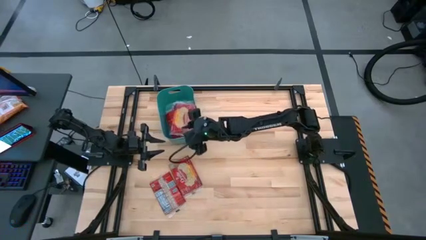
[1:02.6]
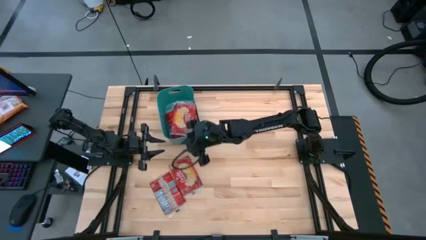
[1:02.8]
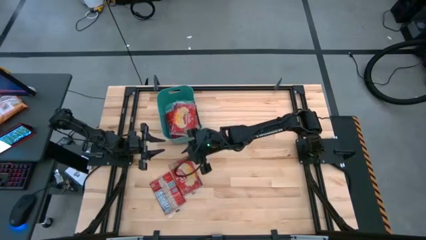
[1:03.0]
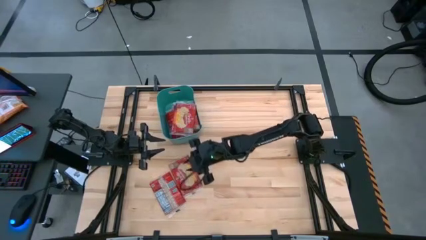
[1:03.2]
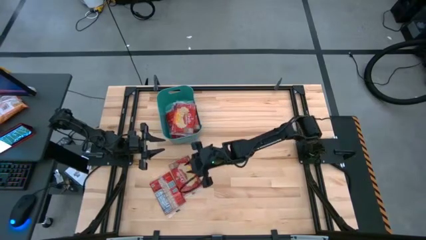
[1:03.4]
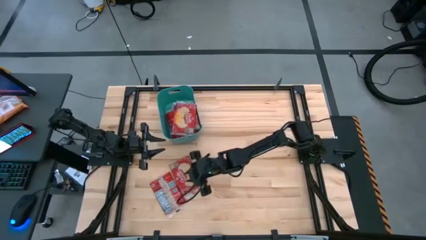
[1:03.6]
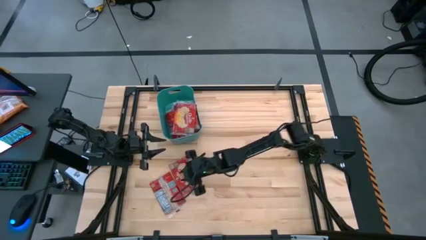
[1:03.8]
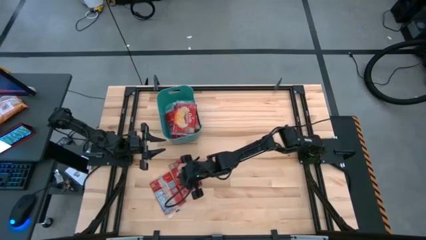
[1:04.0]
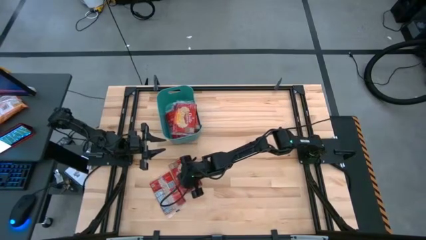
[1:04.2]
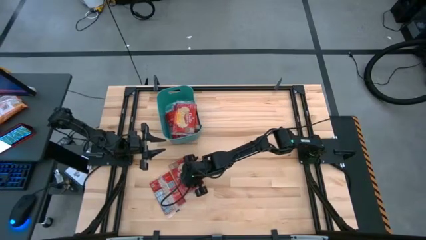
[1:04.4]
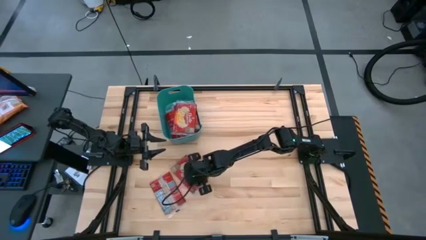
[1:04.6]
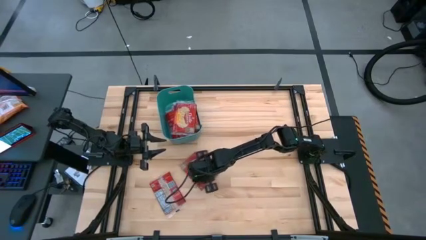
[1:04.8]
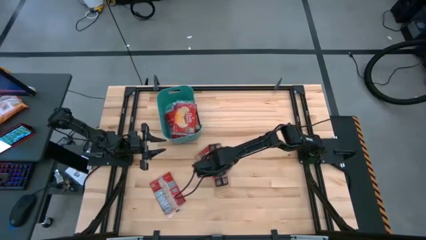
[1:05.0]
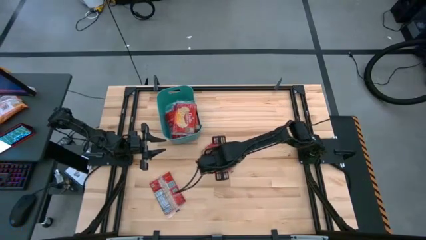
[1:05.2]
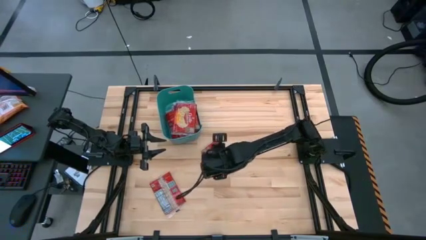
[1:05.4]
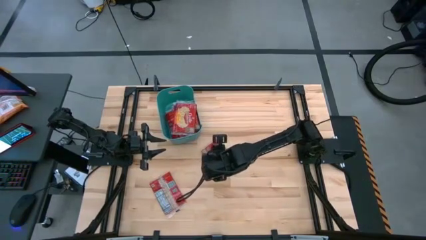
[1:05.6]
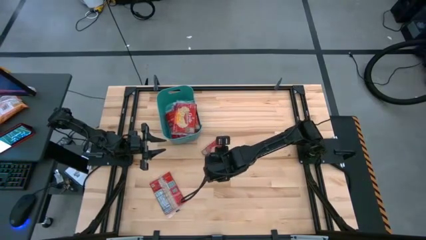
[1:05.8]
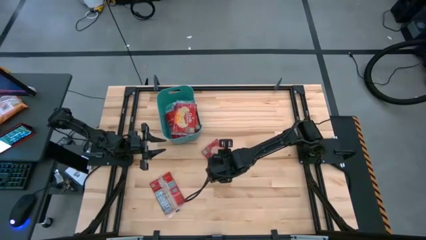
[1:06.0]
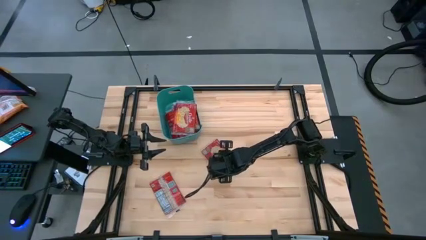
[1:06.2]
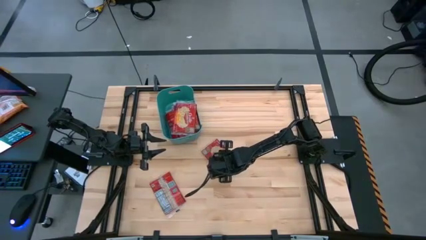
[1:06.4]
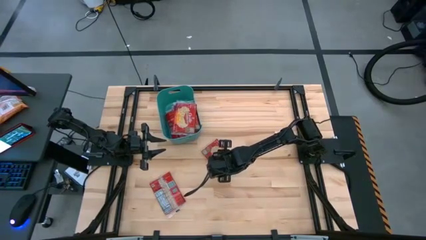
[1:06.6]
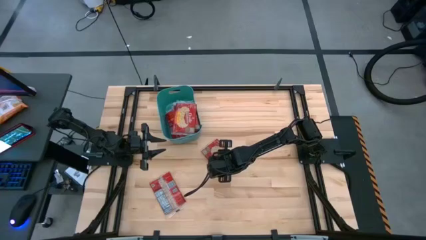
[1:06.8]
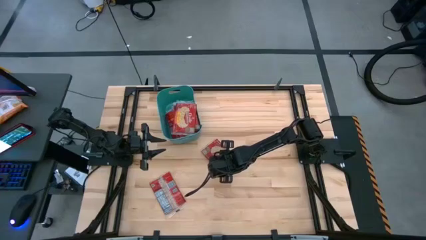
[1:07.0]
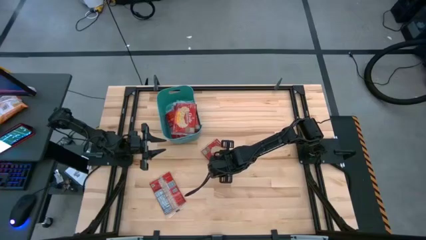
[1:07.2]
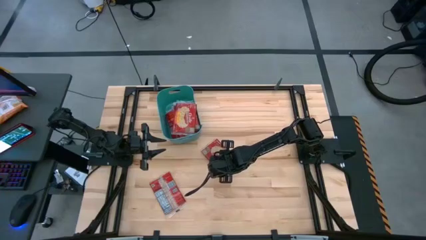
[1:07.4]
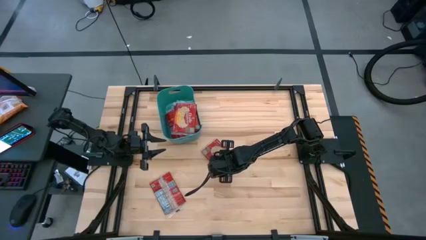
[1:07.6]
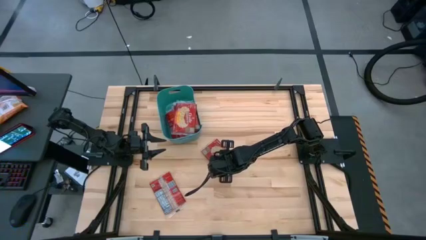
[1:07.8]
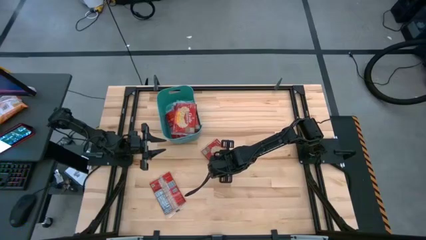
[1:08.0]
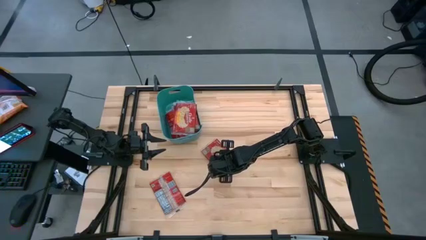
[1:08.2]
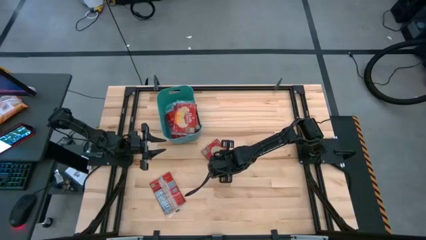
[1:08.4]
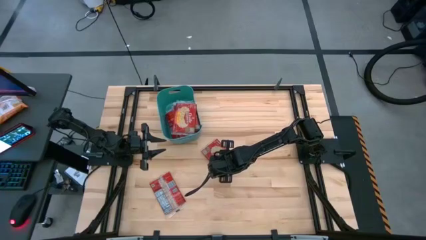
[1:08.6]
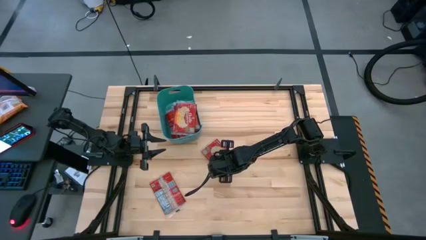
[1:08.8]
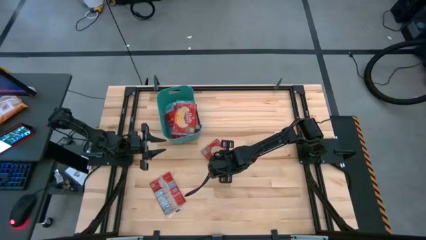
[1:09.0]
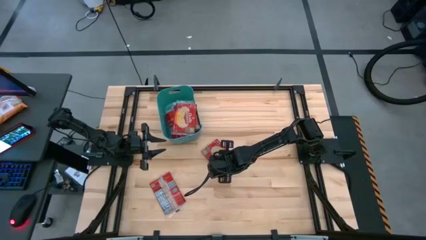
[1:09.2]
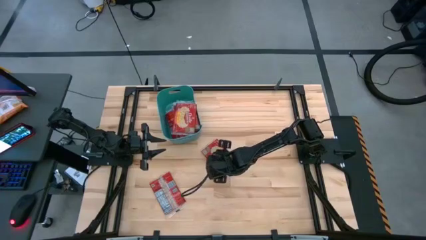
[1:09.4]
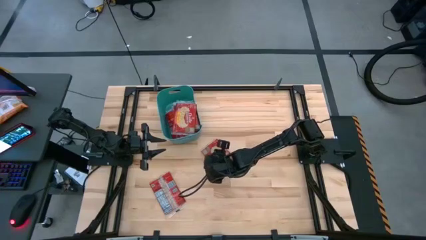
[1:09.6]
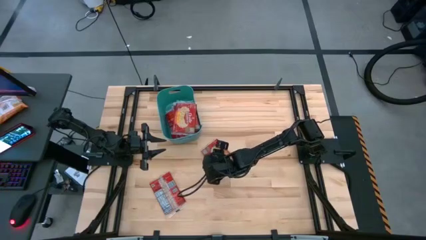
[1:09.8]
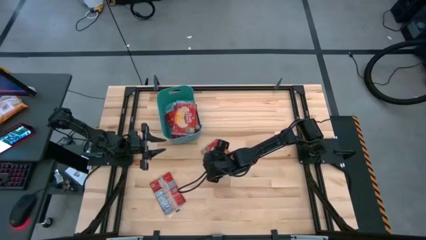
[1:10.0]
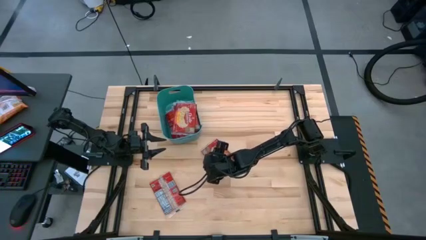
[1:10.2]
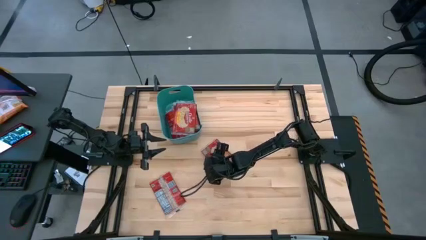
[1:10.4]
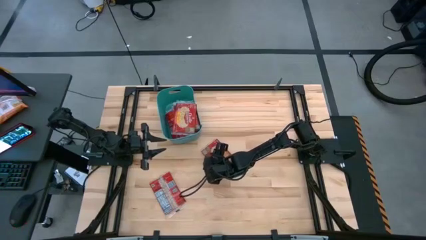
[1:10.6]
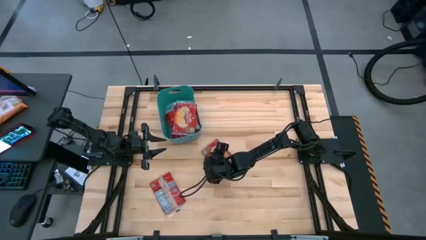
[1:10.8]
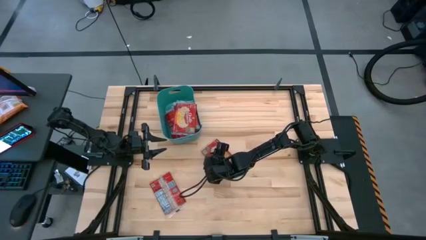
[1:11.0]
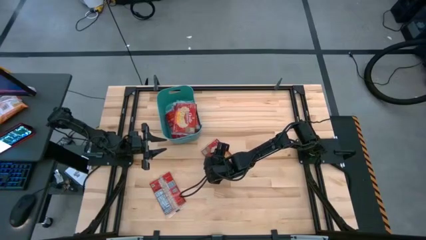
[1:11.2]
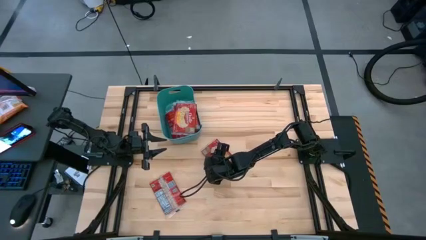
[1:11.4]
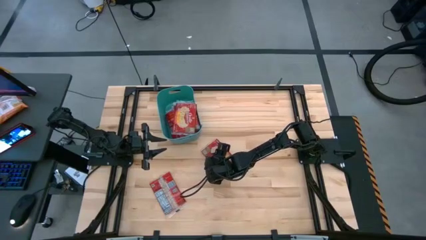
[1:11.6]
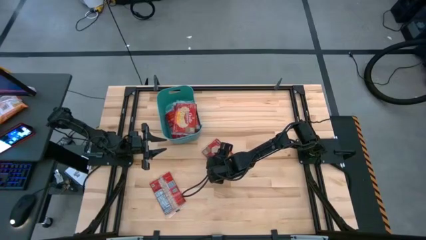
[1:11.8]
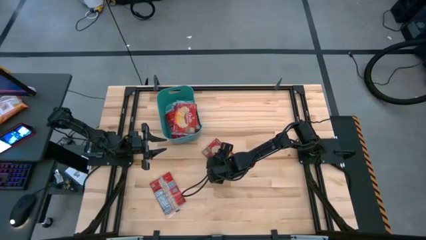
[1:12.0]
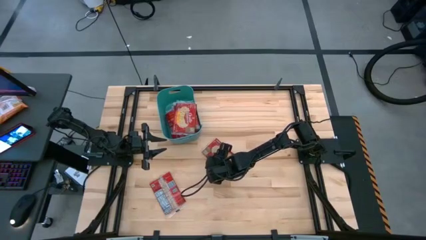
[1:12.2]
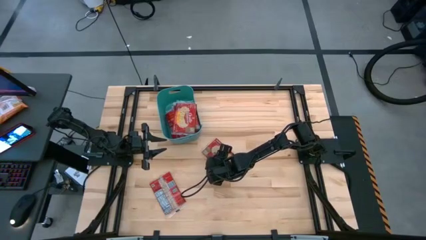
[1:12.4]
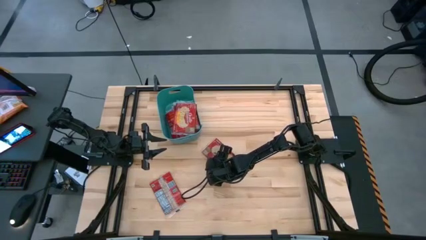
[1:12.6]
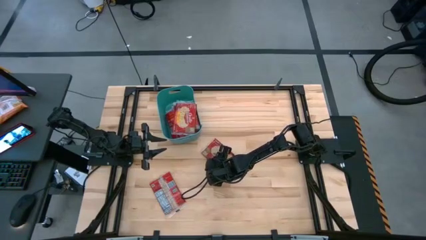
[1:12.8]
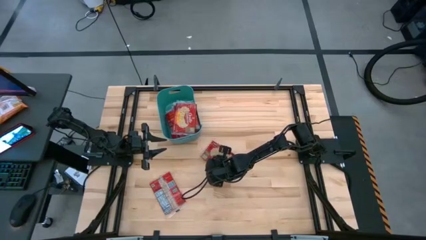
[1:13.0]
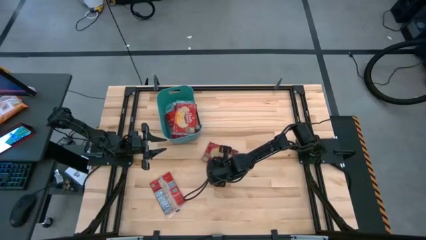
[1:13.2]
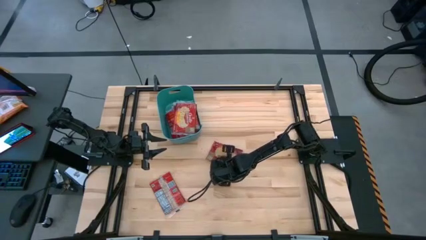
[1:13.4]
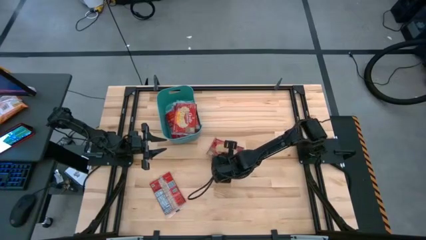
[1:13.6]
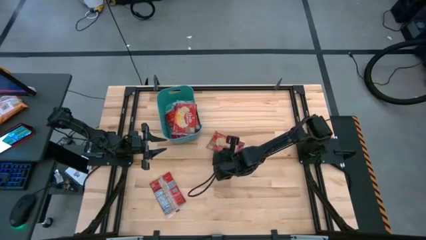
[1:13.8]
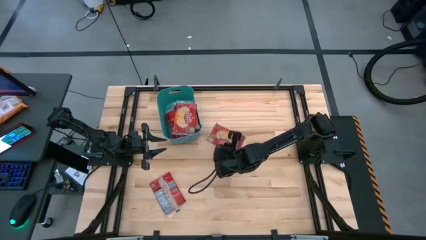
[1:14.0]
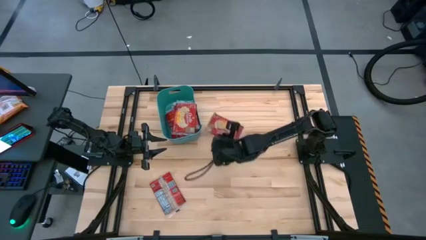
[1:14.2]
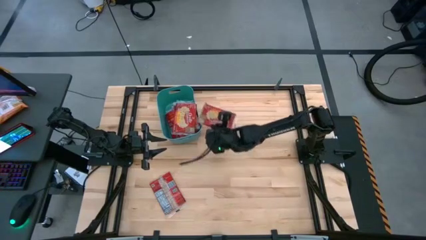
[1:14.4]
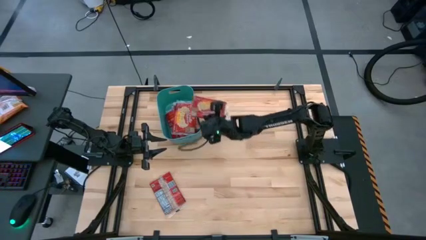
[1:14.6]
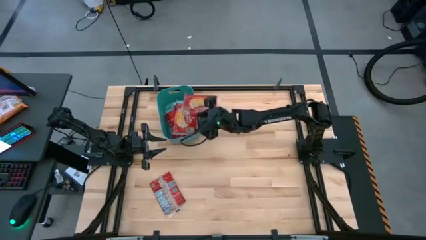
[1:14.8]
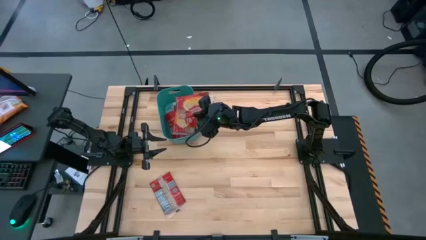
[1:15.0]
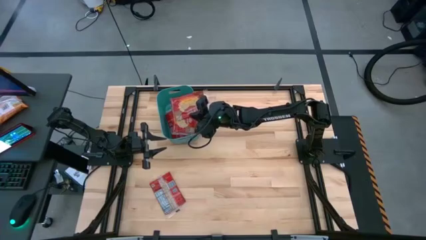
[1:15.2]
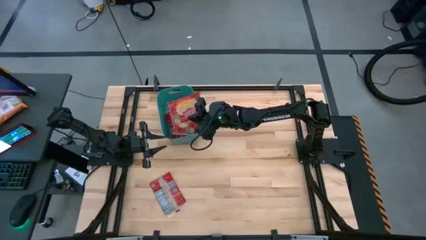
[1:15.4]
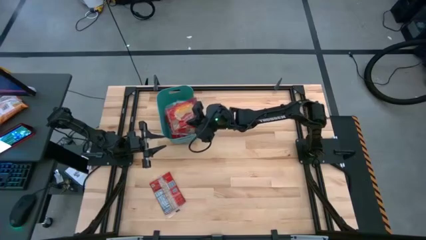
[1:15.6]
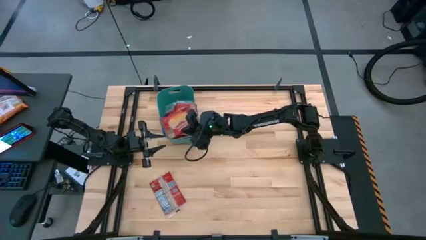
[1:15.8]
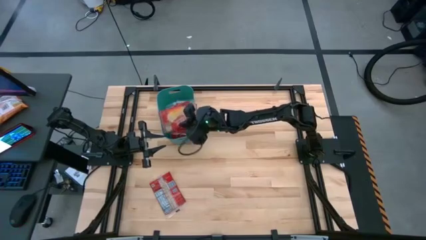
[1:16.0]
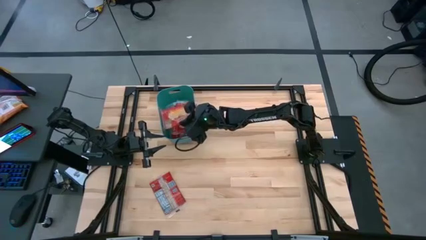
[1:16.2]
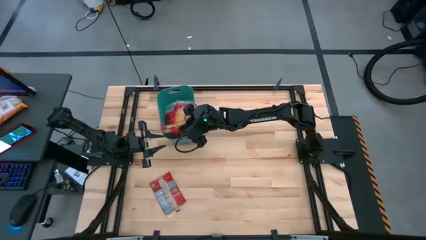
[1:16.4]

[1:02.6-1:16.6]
Task: Sort popcorn bags into baskets
Put the red popcorn bag into the green bin
